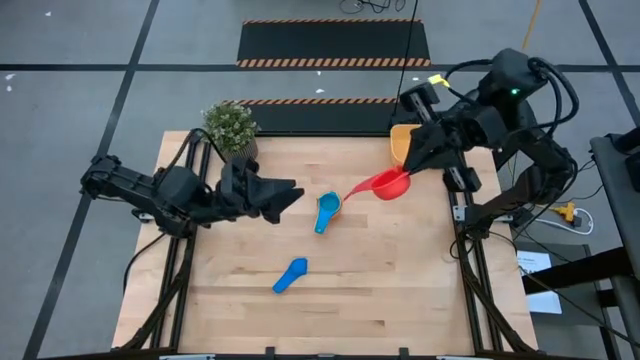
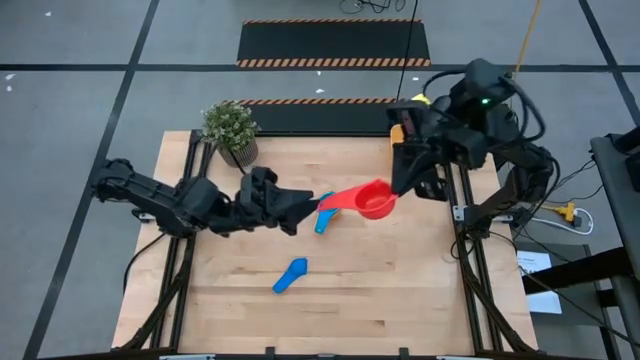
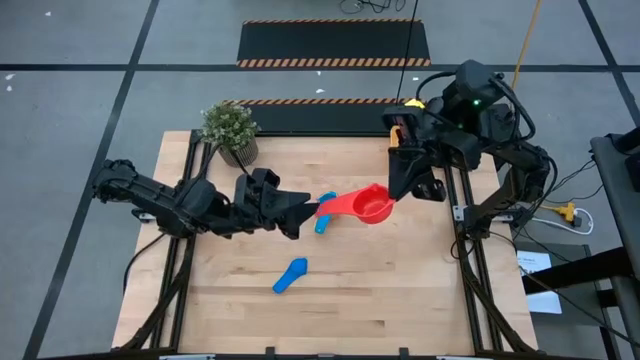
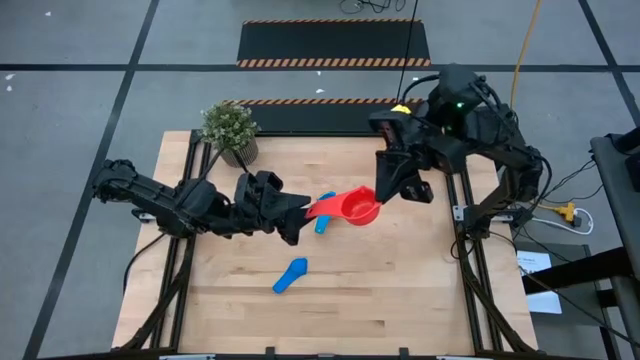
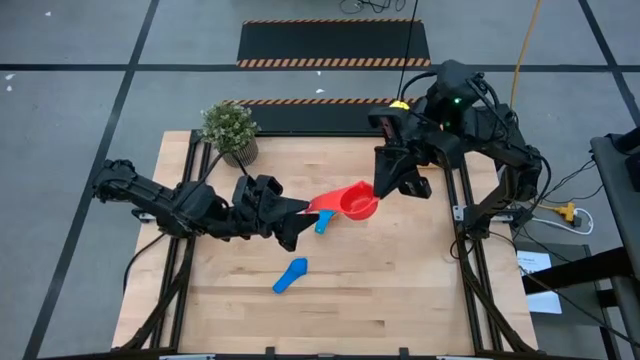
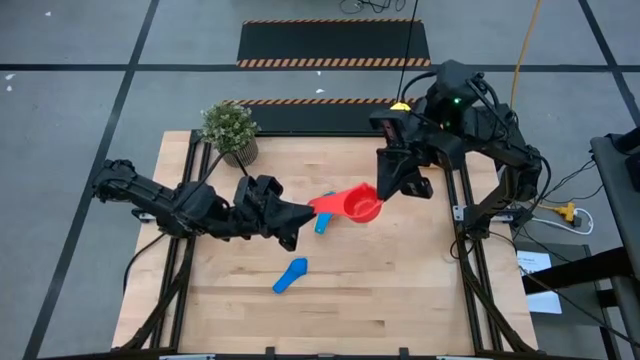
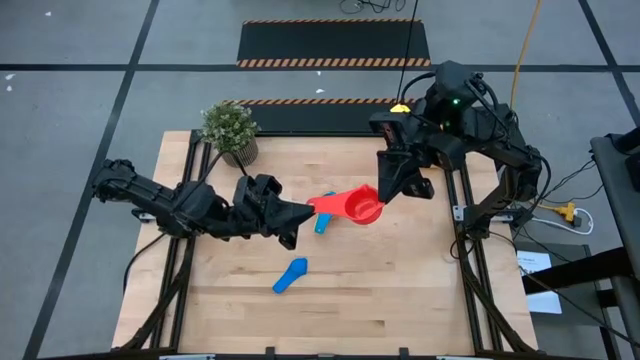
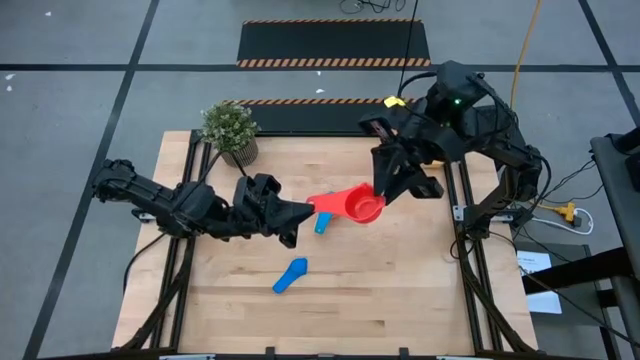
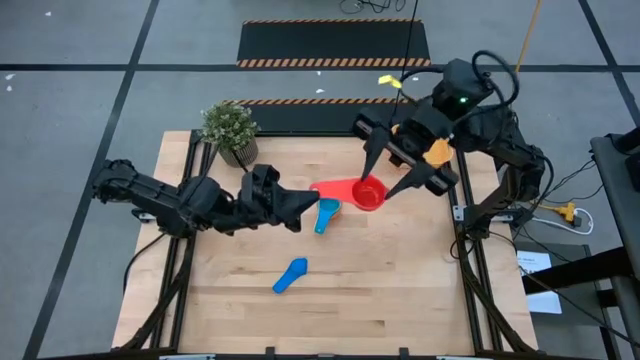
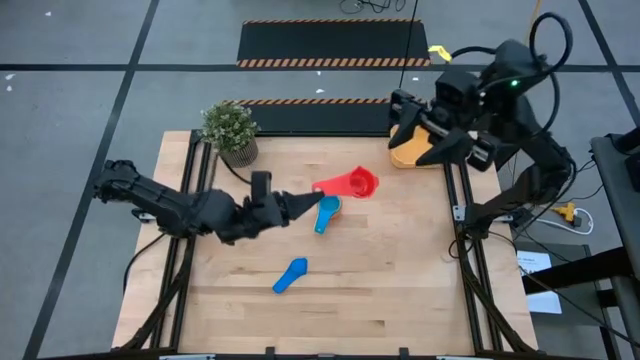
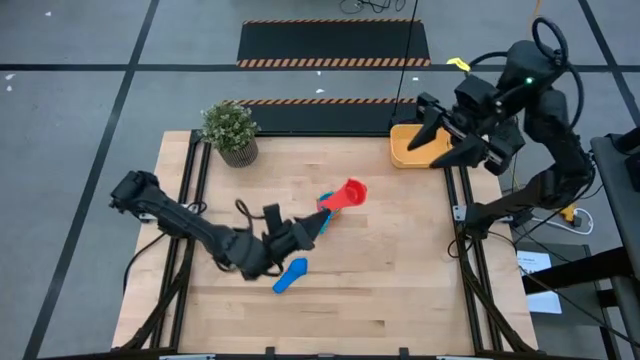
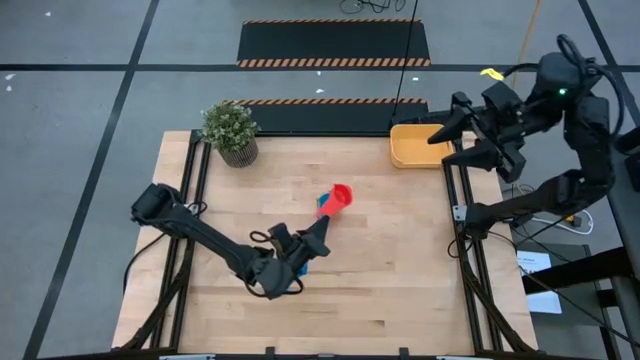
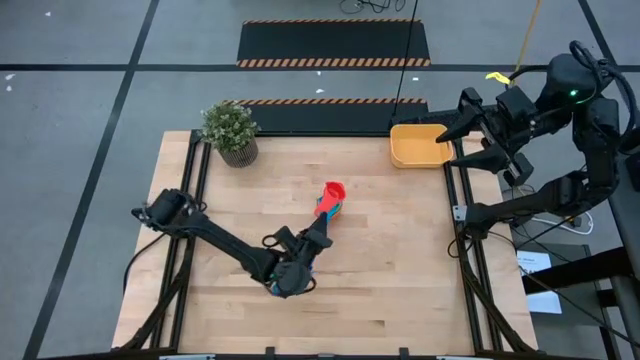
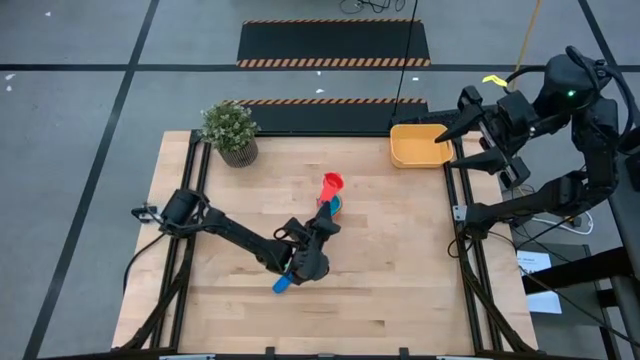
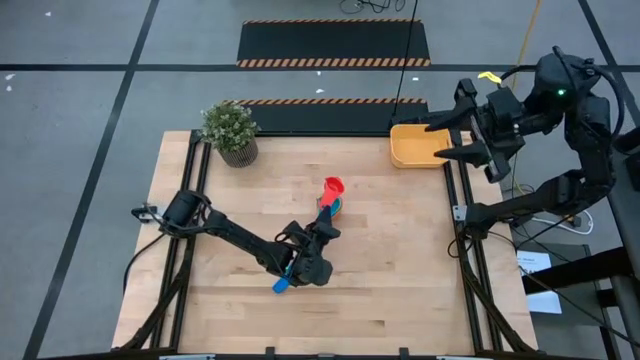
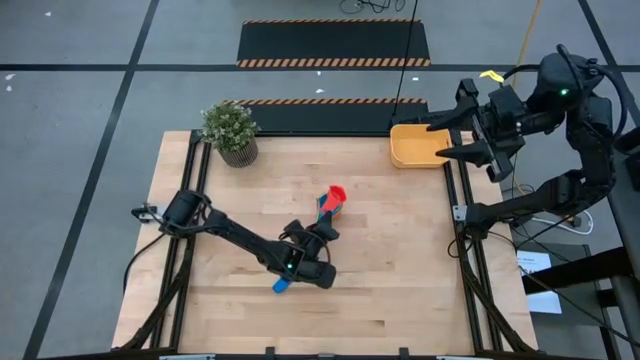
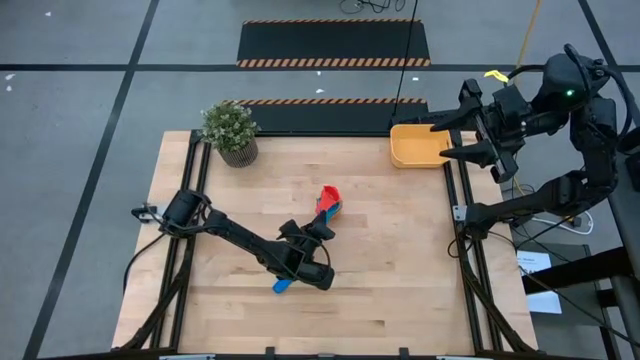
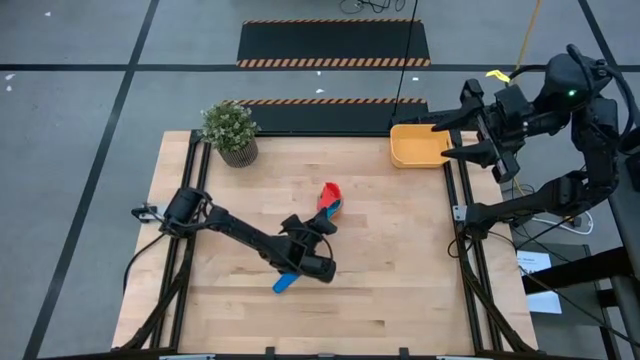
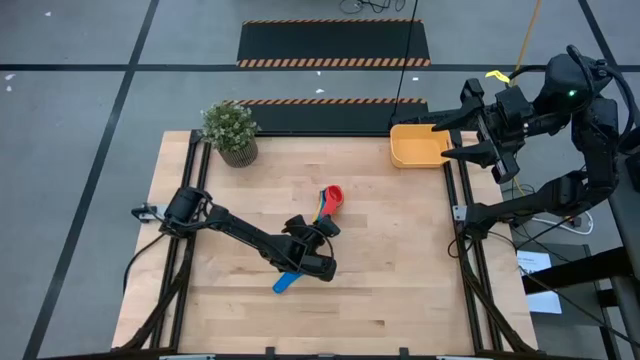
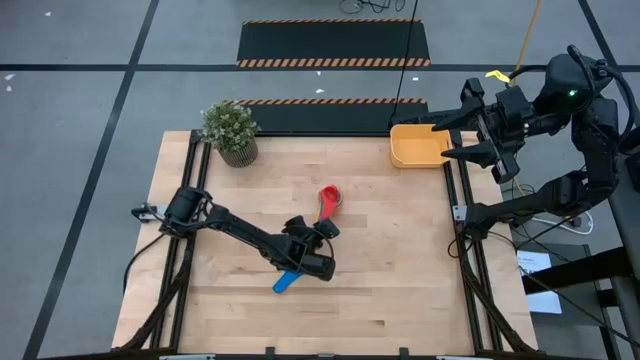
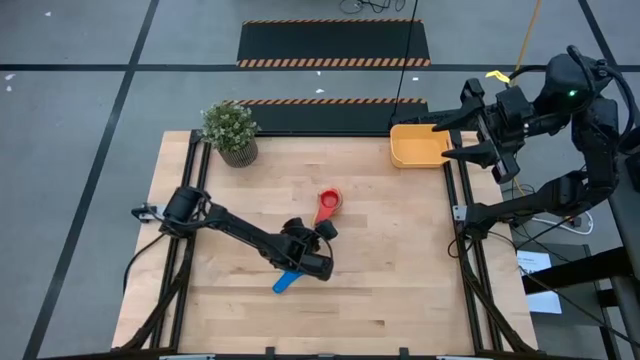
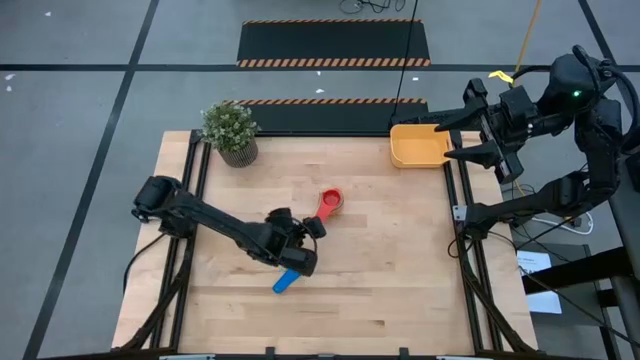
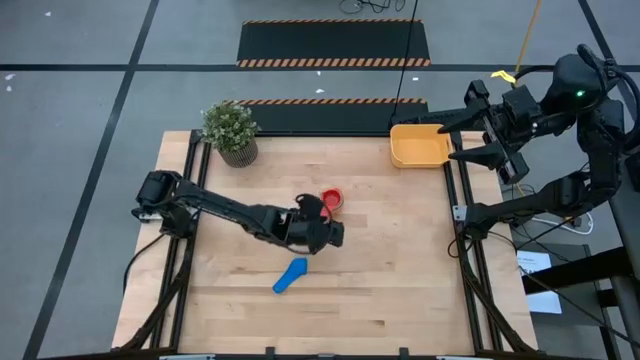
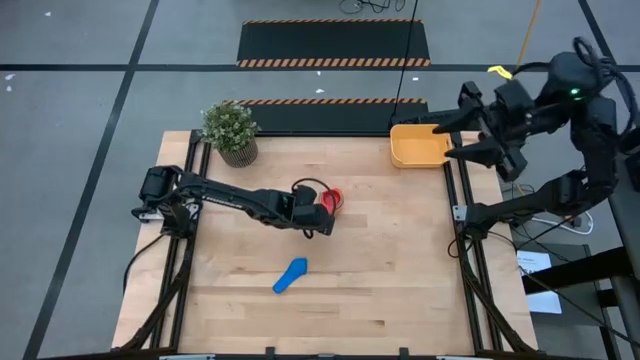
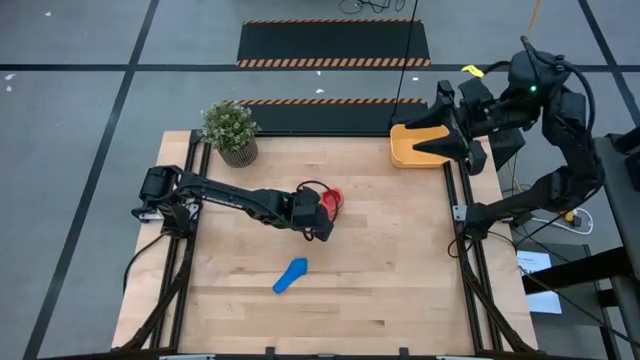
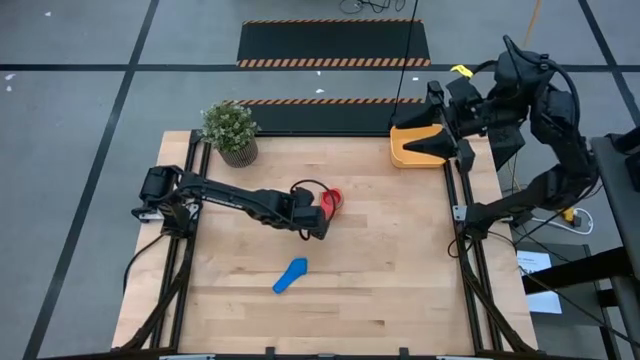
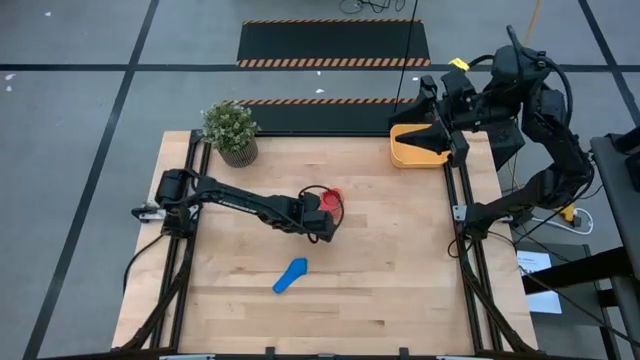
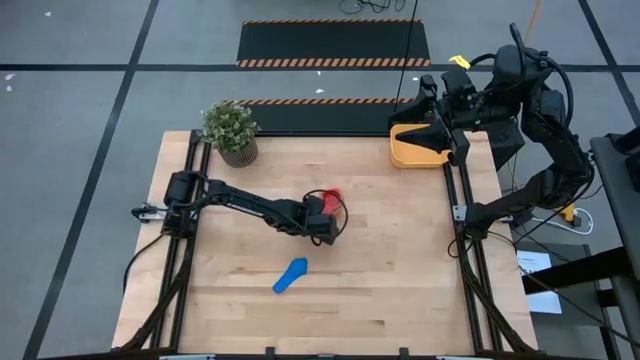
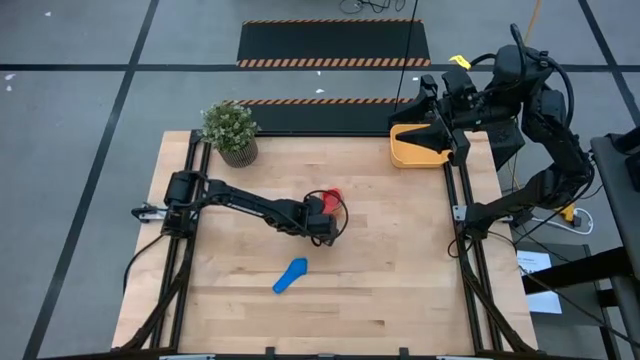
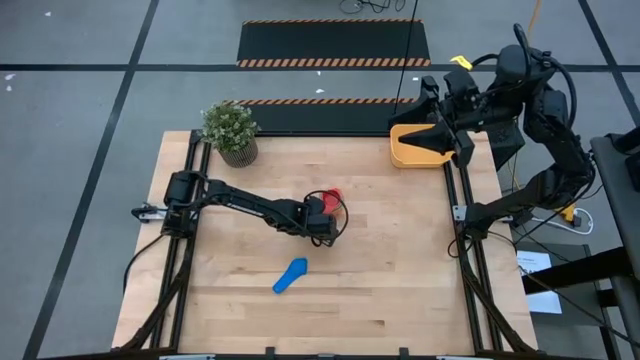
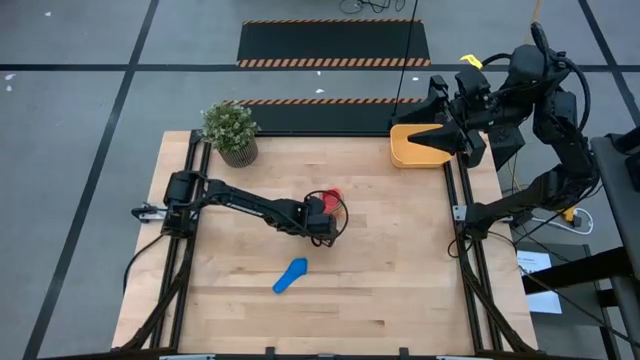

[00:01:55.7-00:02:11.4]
Task: Nest measuring cups in basket
Stack the red measuring cup on top of the light blue measuring cup

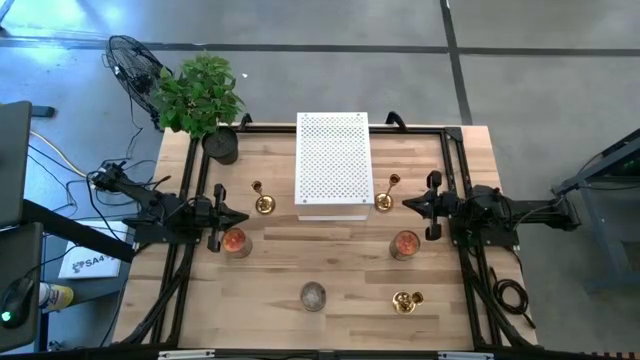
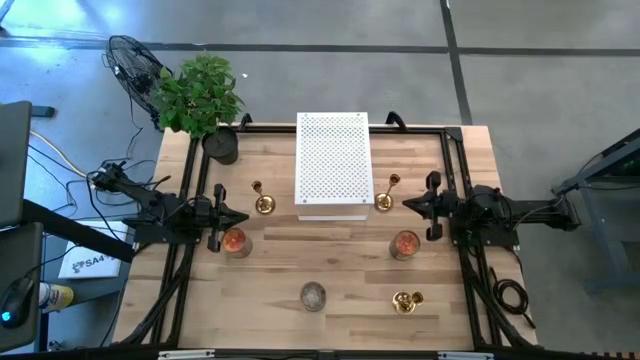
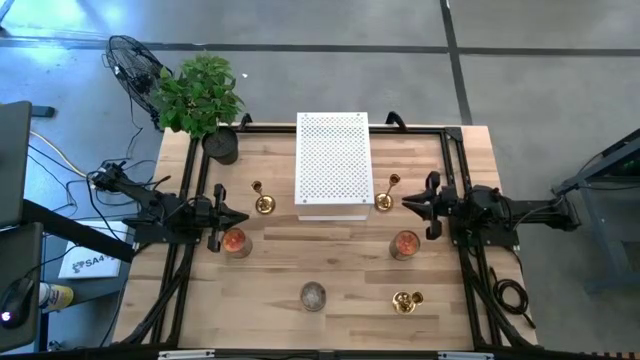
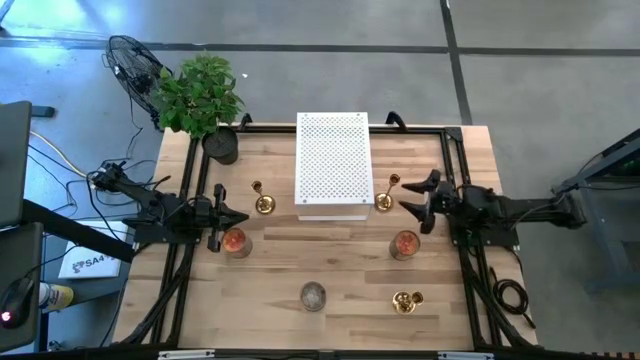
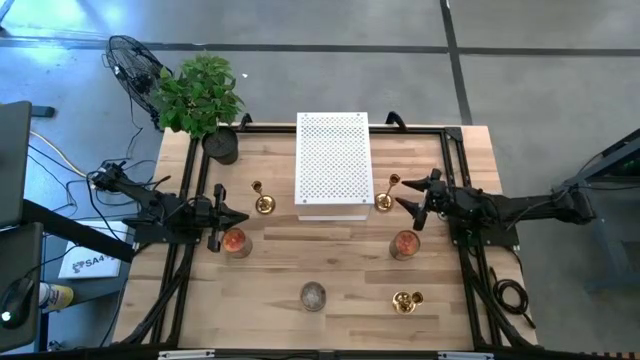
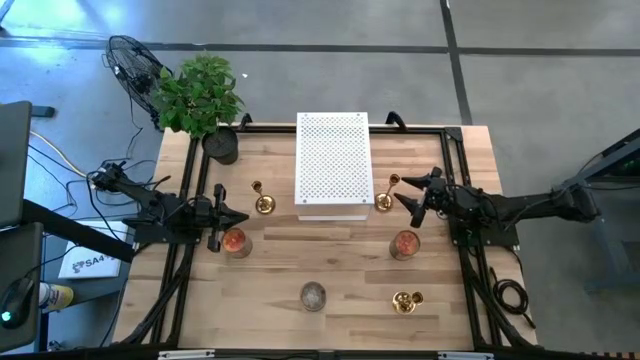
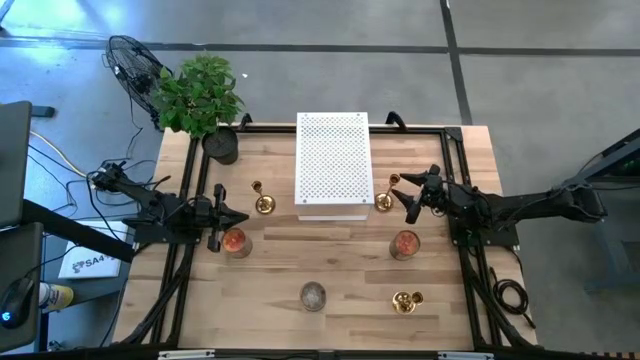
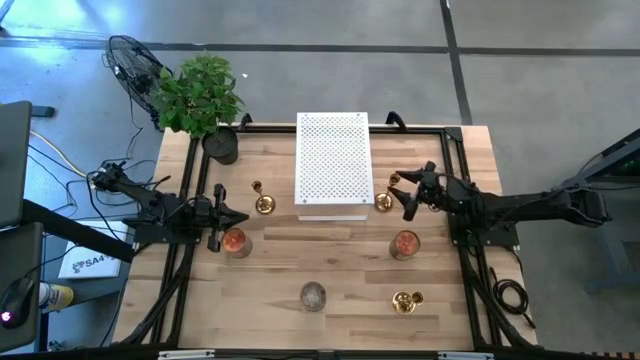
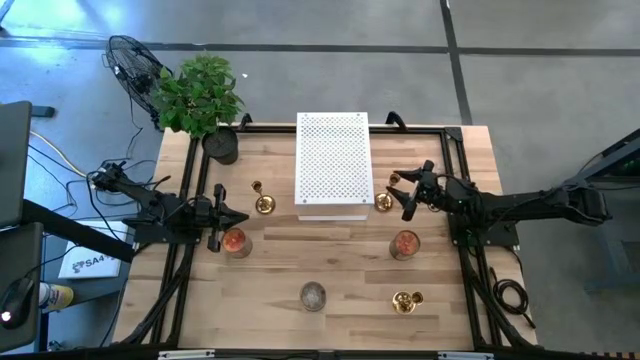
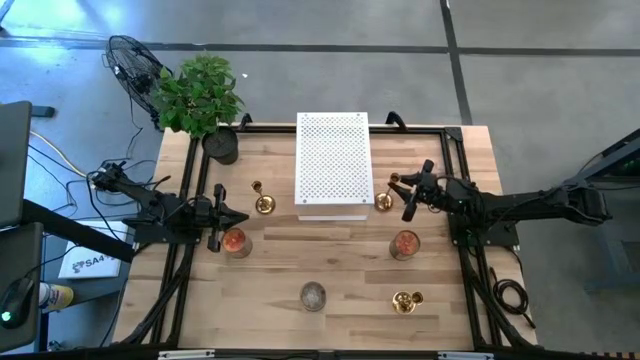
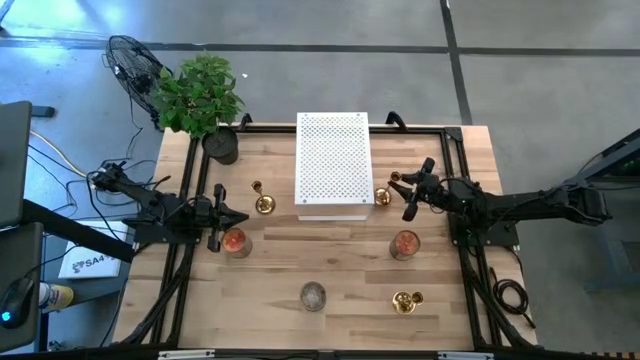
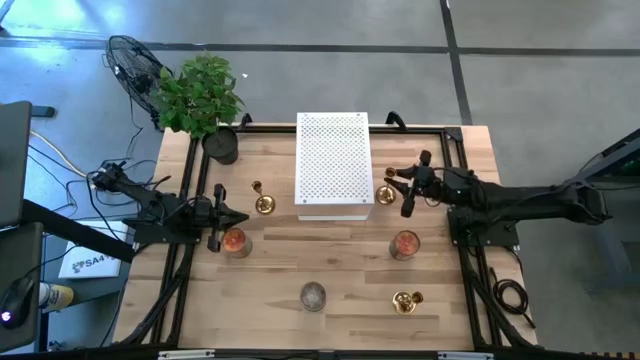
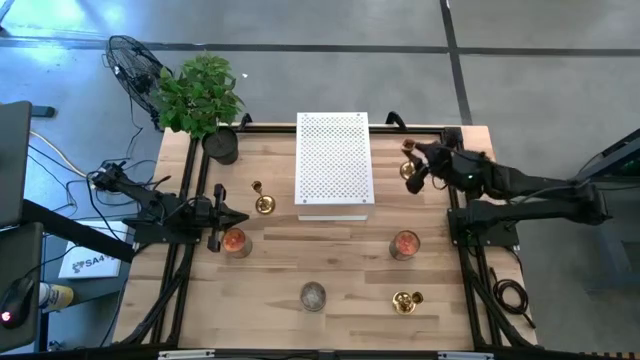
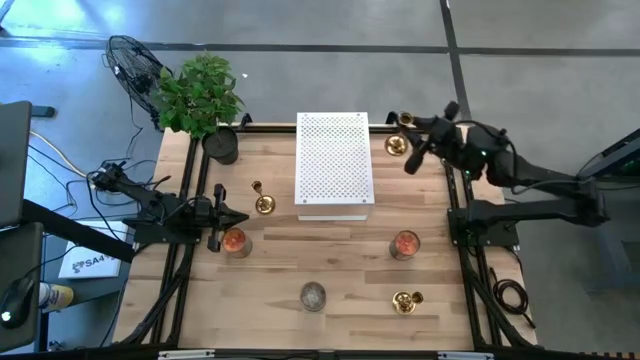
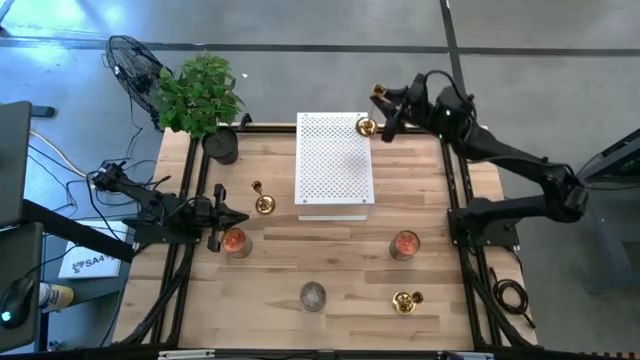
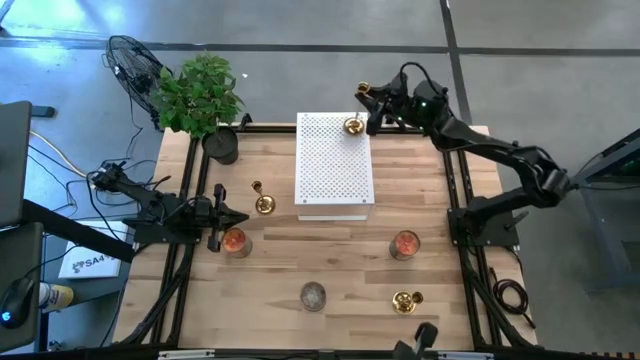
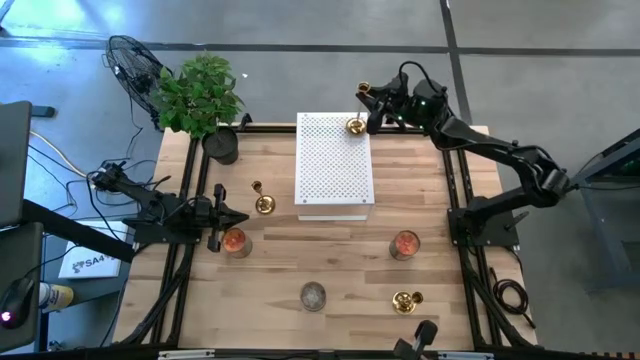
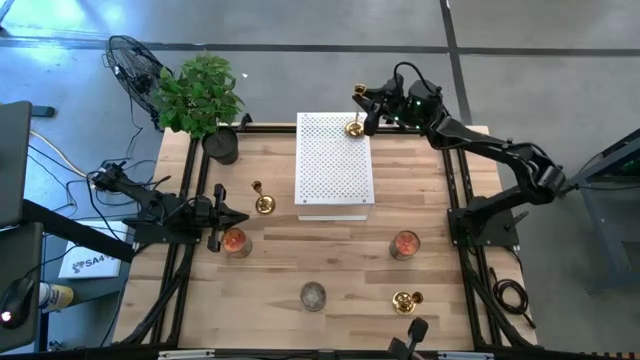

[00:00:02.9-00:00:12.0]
Task: Pick & Place candle stick holders
Put the right golden candle holder on the shelf
